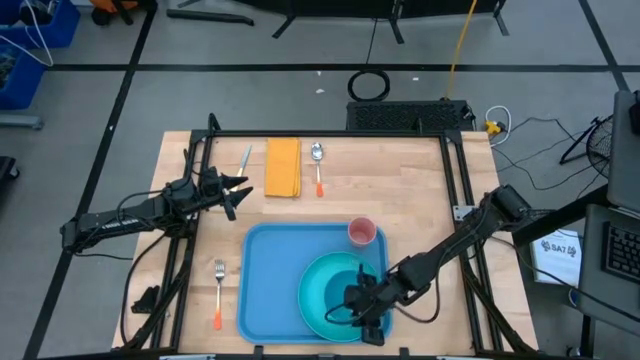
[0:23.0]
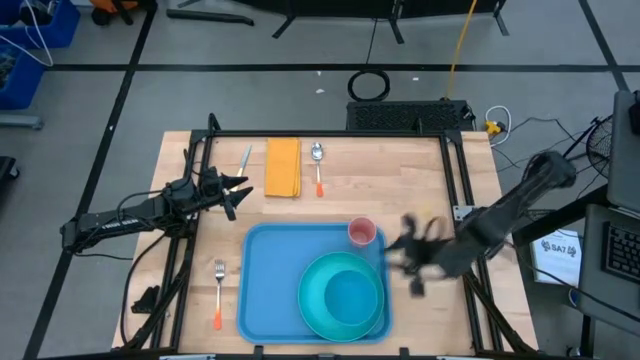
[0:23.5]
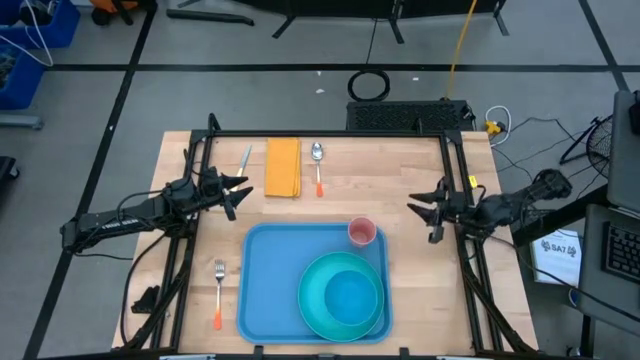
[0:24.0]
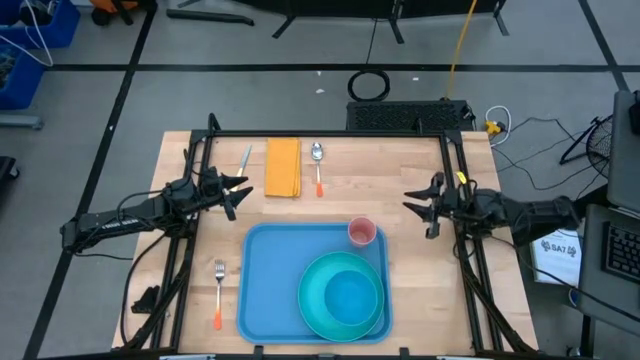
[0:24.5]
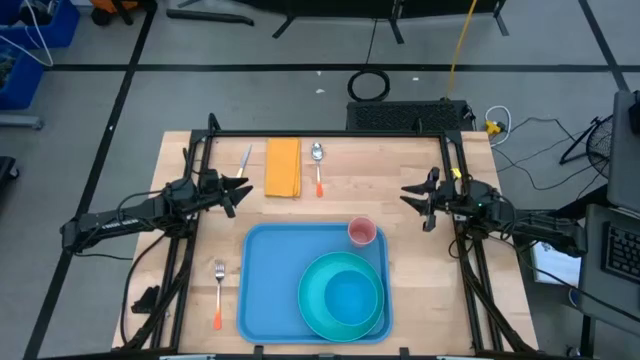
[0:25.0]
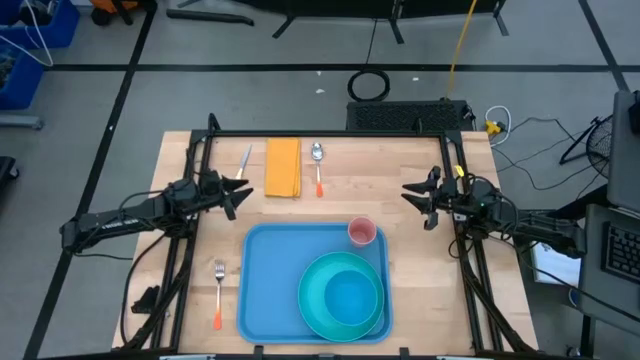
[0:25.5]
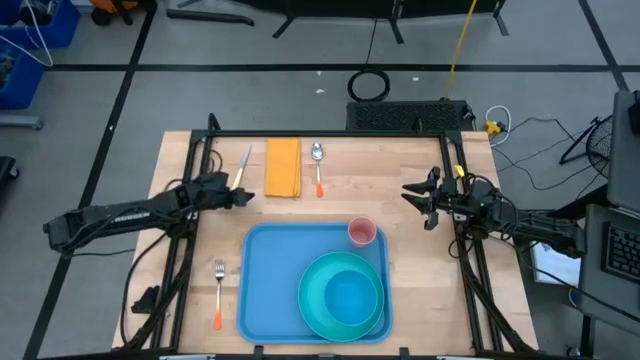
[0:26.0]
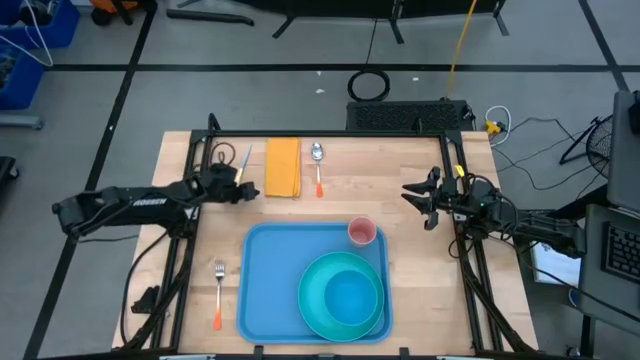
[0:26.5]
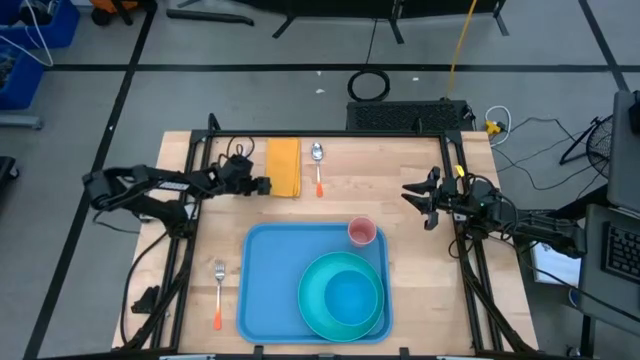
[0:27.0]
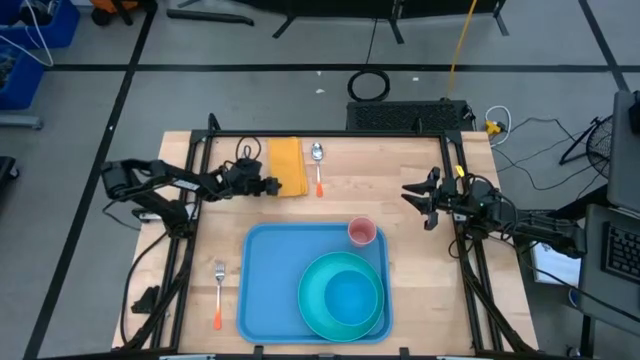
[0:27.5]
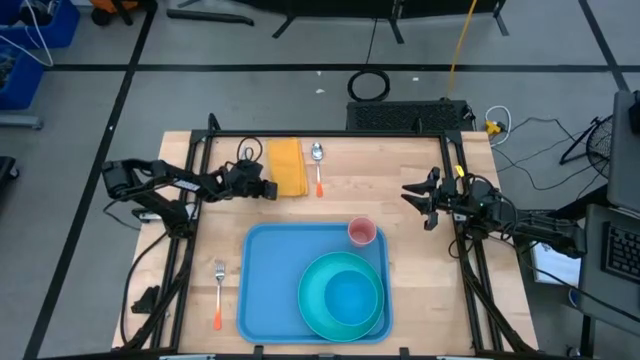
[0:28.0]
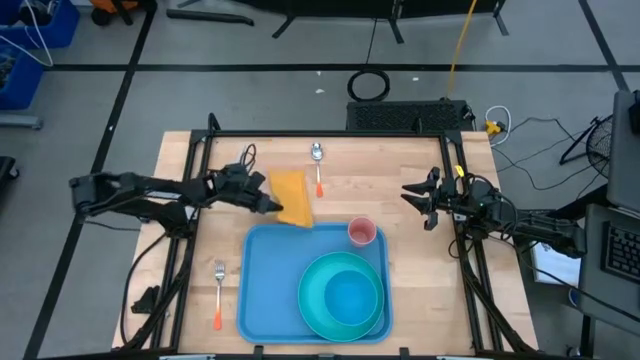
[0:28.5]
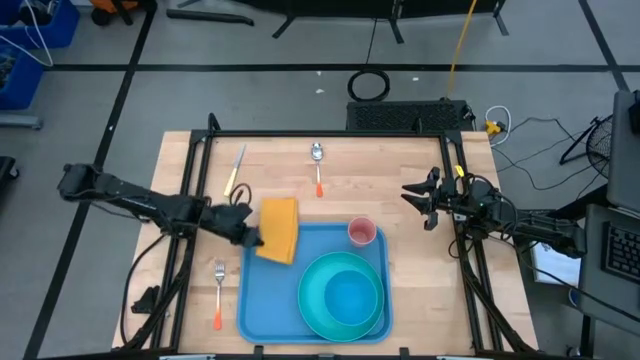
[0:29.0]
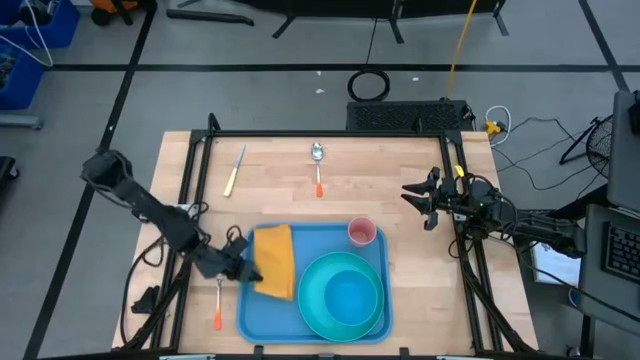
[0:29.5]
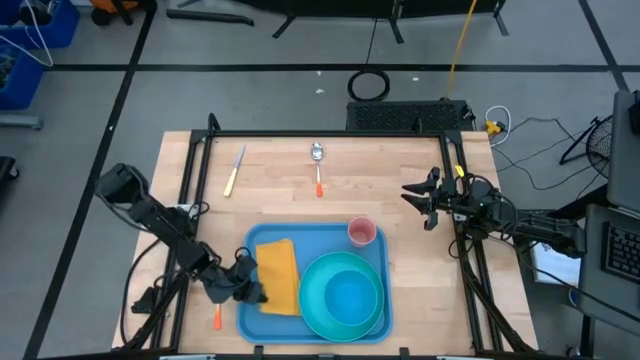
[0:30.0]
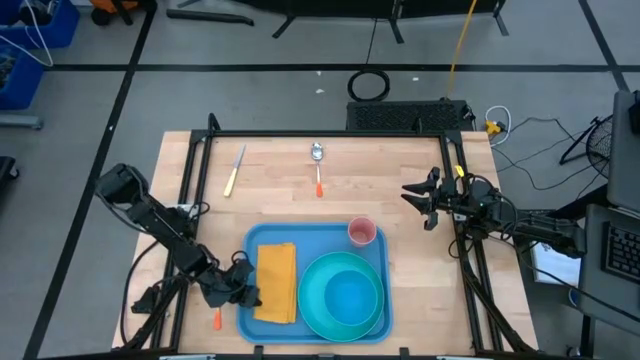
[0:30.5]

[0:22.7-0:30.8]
Task: Set up tray
Put the yellow napkin on the blue serving tray to the left of the light blue plate

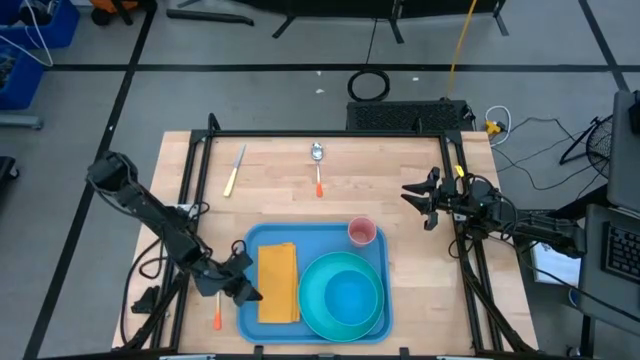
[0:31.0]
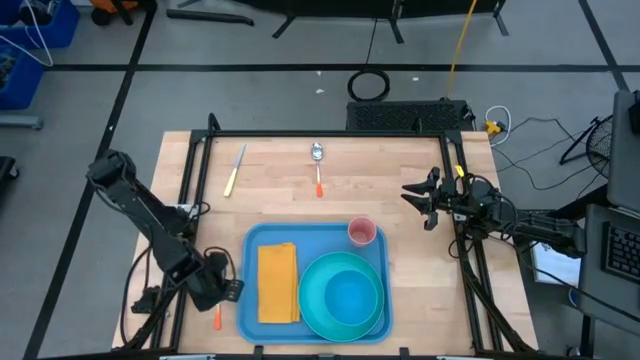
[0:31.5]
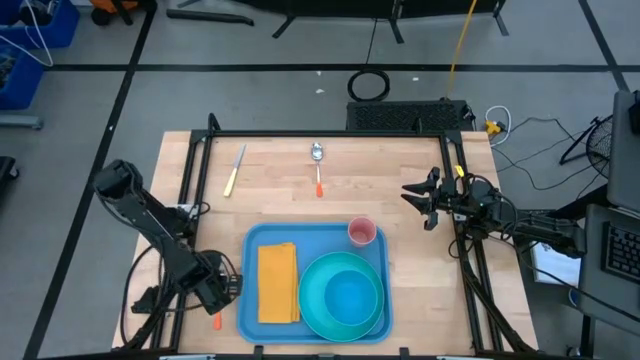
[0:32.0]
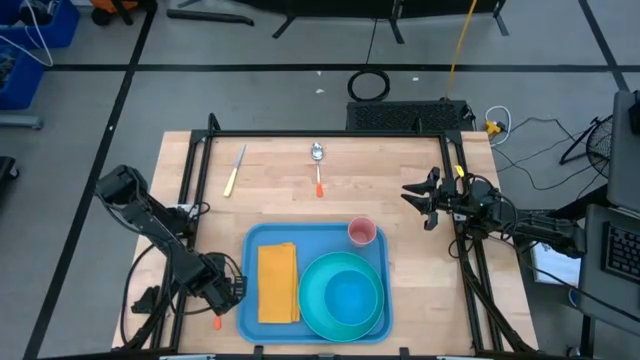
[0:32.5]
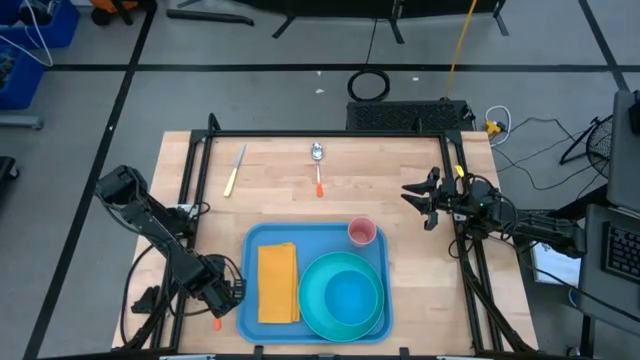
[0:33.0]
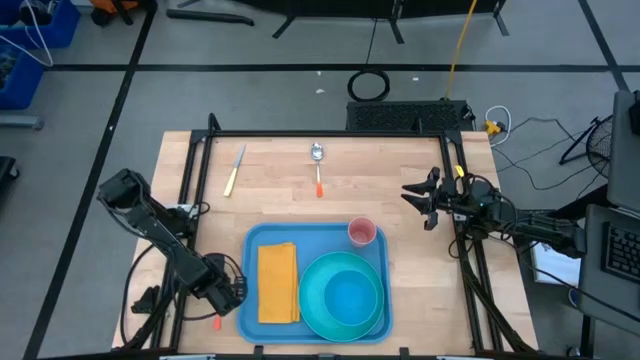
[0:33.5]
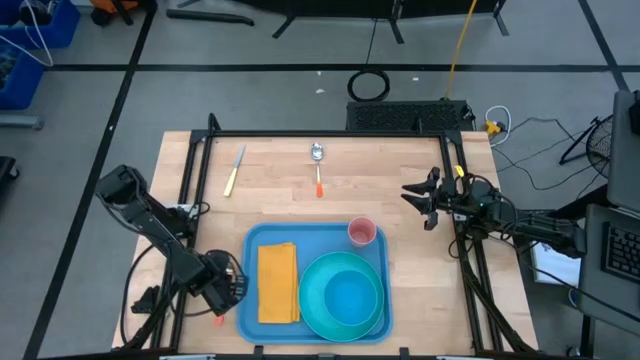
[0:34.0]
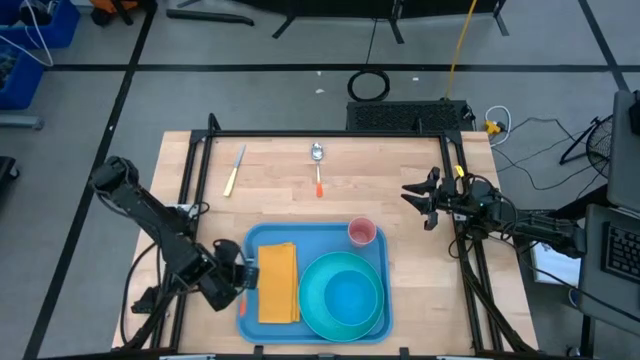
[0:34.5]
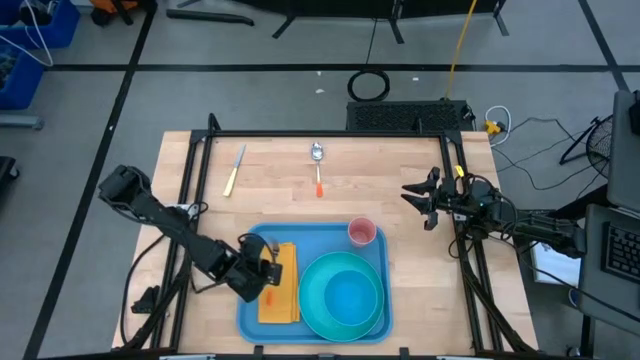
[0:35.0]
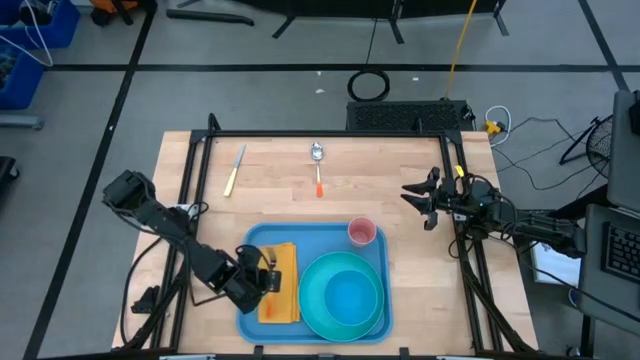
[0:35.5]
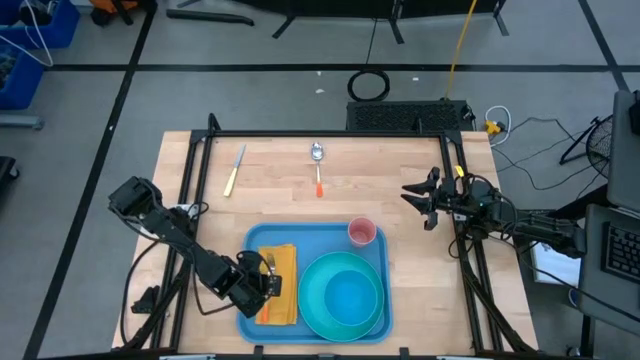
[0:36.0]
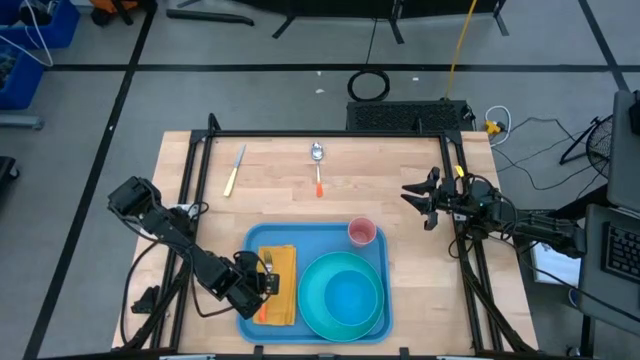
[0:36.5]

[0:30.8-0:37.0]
Put the orange fork on top of the yellow napkin

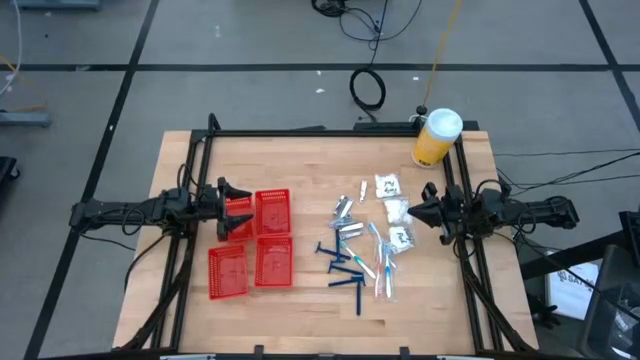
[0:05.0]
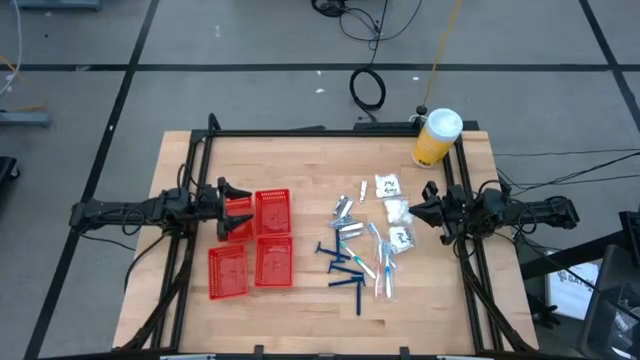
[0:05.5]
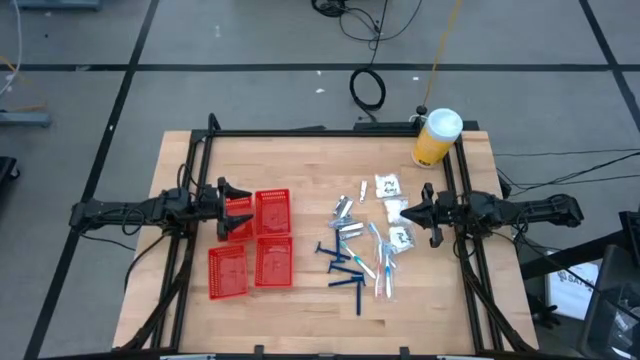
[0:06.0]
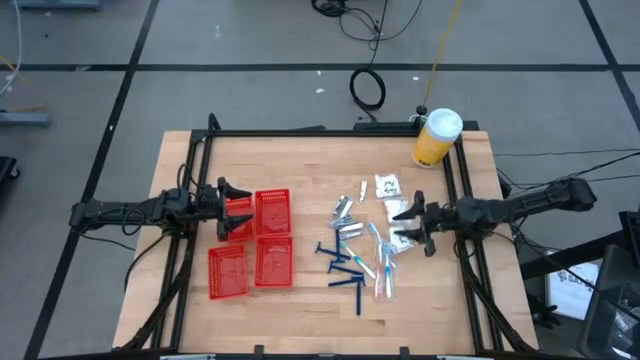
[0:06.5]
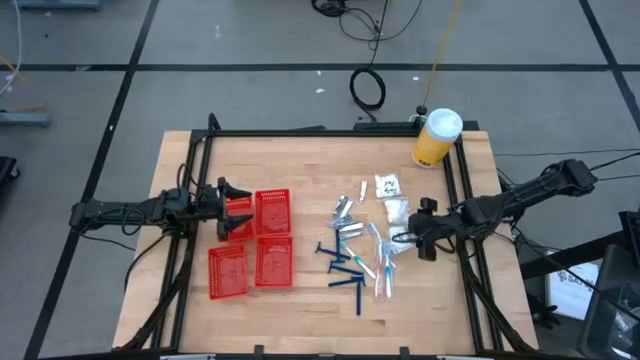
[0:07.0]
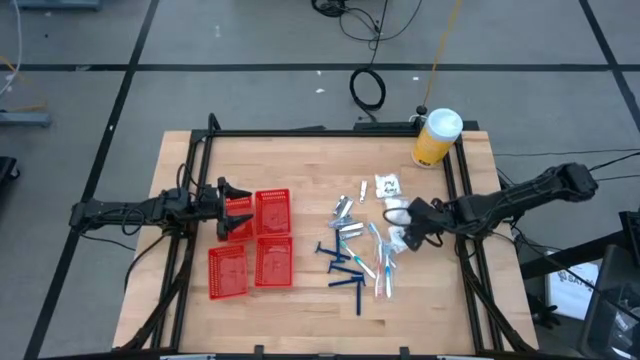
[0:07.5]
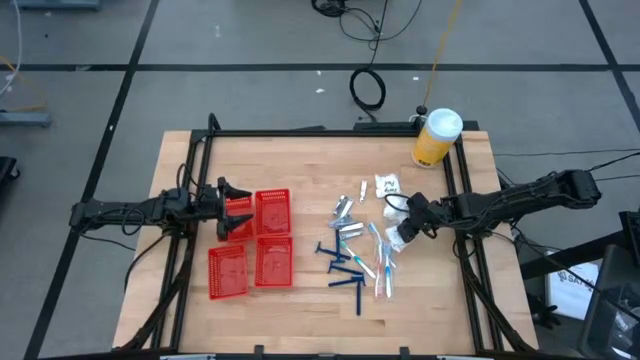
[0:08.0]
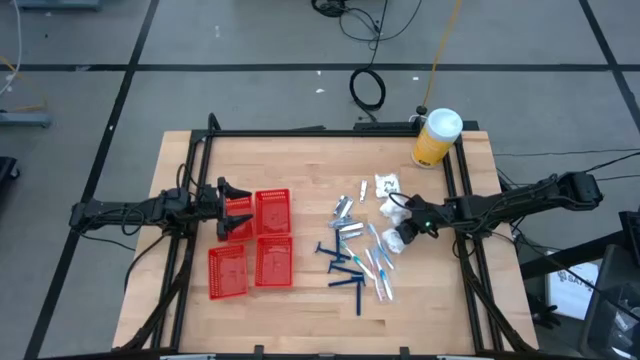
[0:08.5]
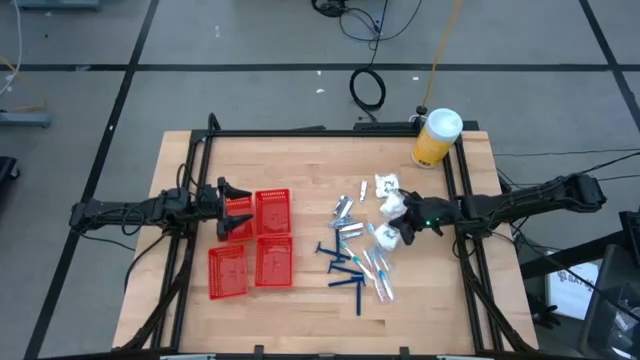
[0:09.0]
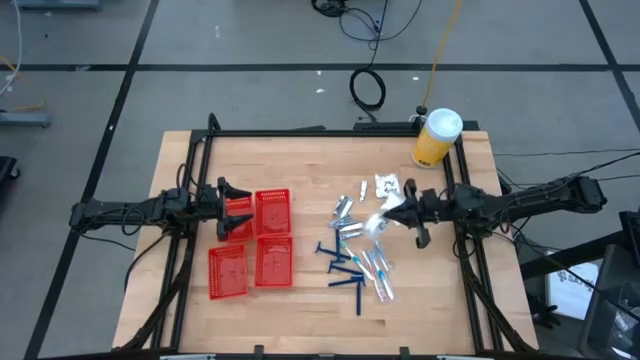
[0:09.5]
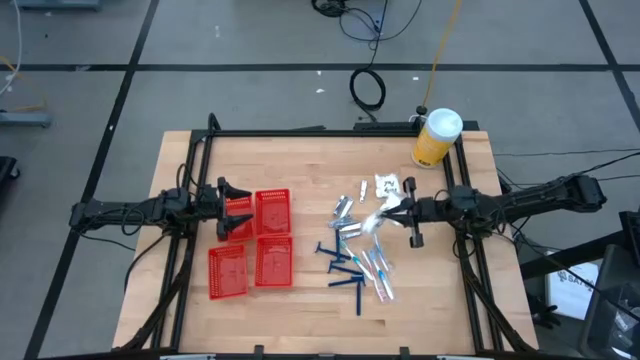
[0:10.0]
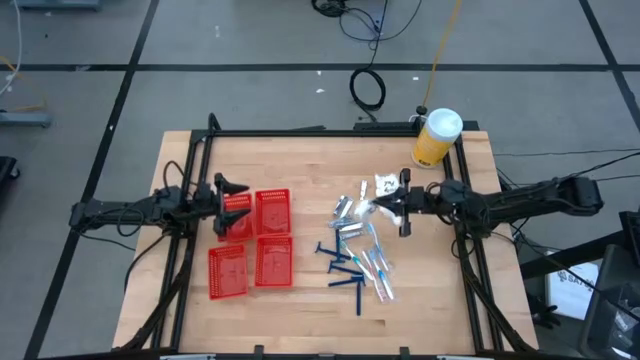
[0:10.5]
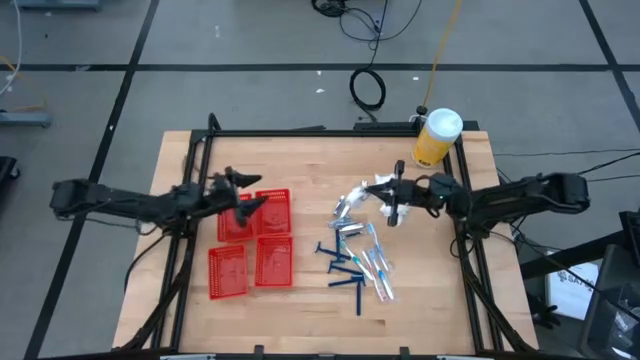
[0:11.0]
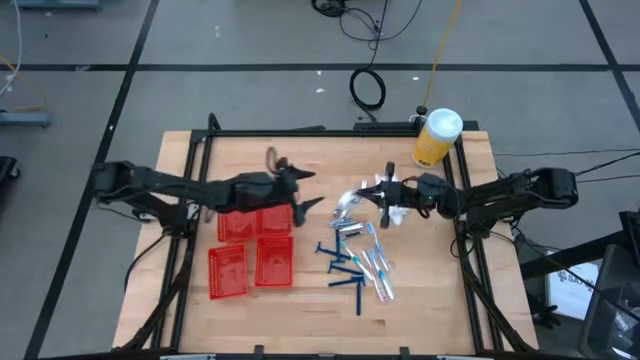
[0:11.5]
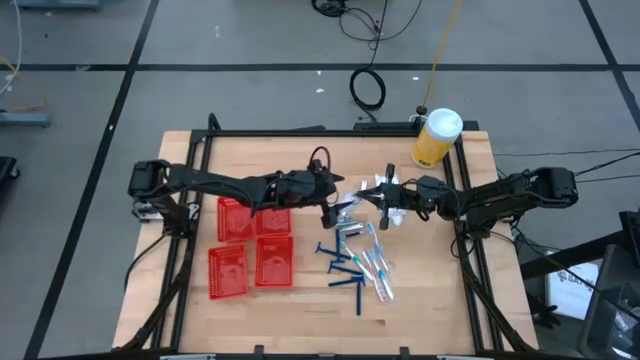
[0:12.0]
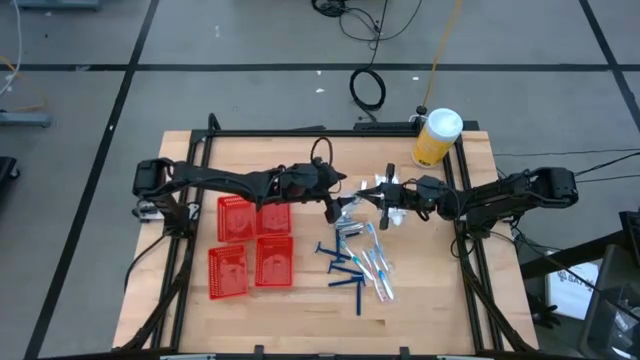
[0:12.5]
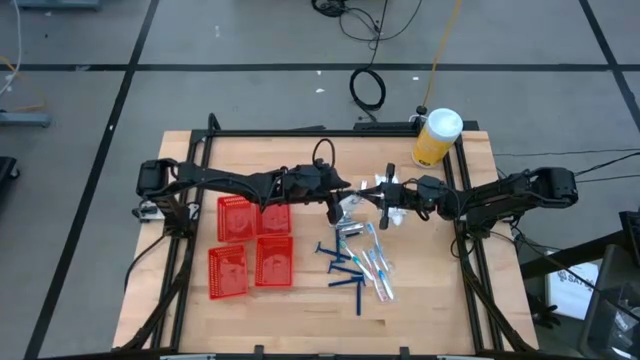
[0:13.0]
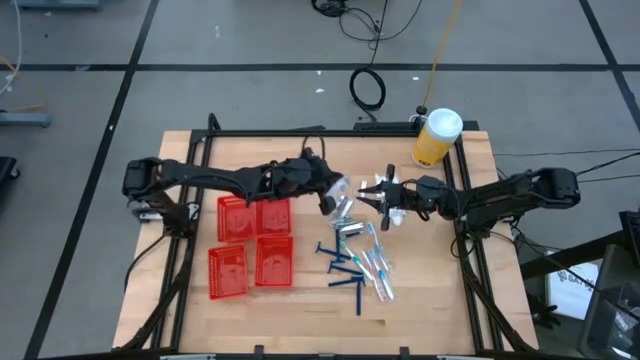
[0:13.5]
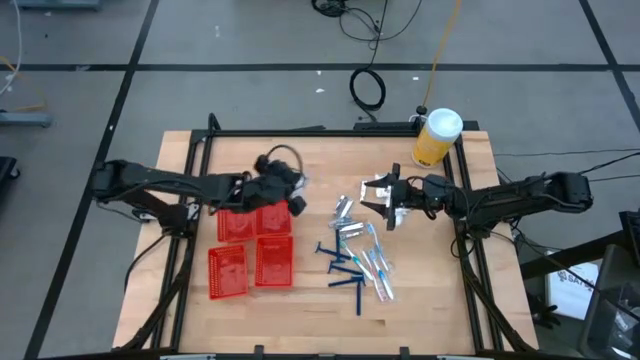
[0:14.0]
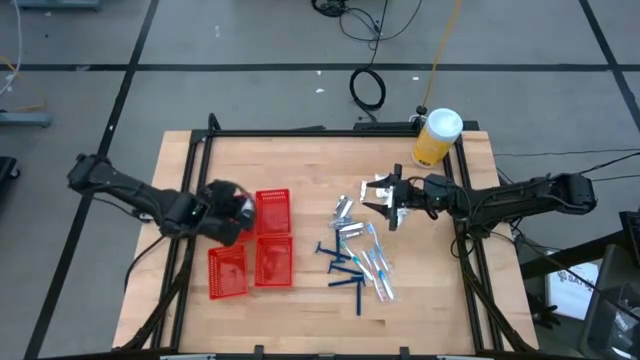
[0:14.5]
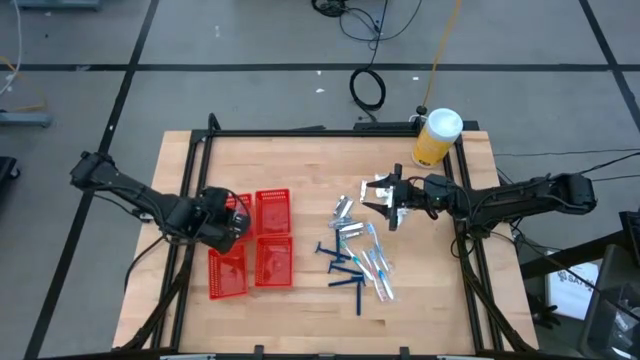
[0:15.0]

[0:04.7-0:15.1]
Task: Pick & Place Travel size toiletries
Put the transparent cotton pack into the top left red basket
